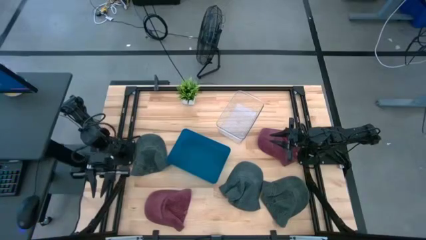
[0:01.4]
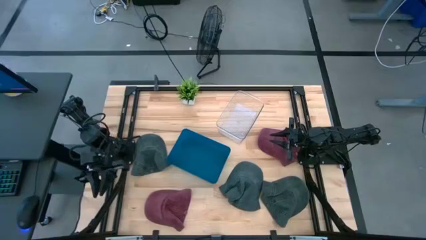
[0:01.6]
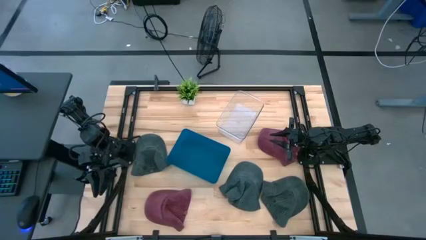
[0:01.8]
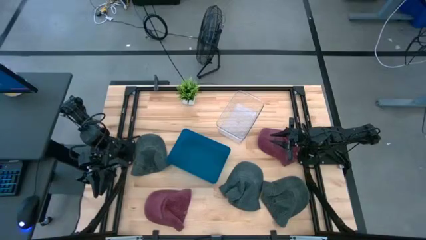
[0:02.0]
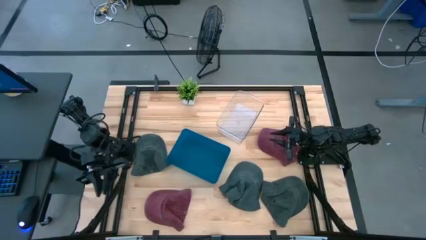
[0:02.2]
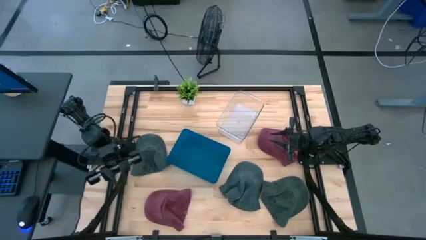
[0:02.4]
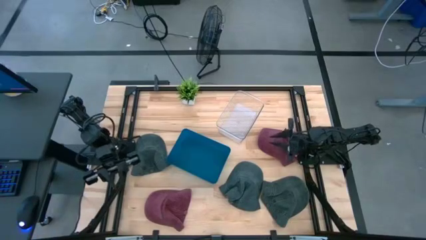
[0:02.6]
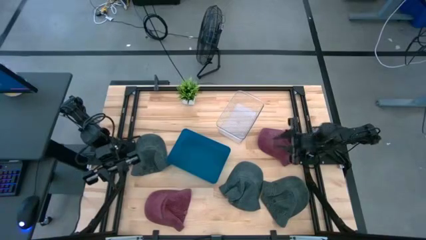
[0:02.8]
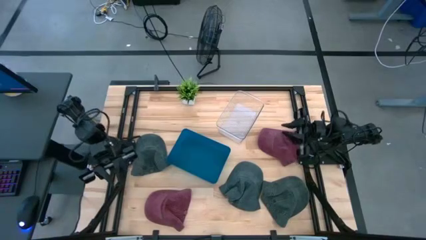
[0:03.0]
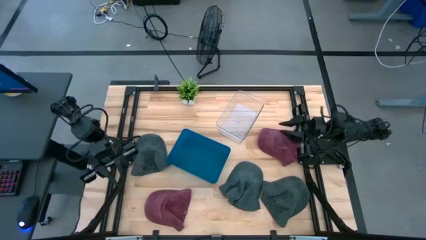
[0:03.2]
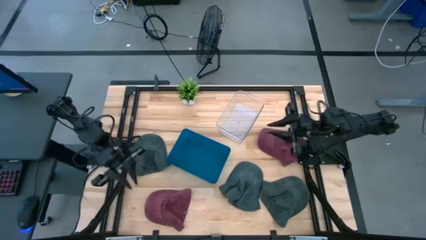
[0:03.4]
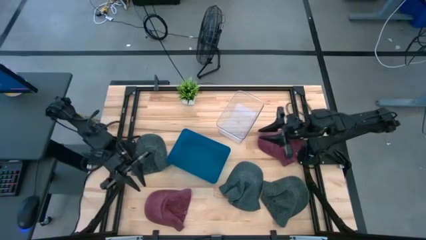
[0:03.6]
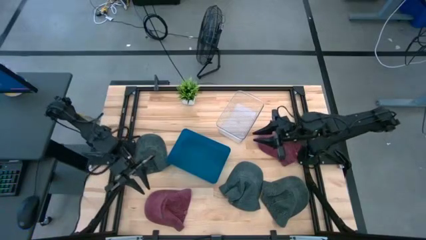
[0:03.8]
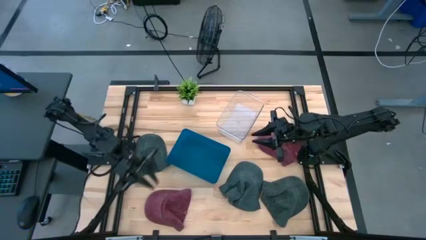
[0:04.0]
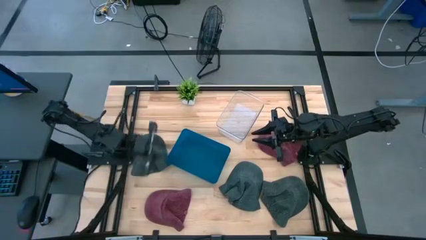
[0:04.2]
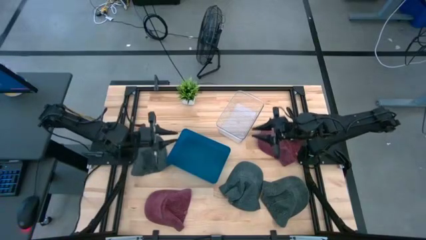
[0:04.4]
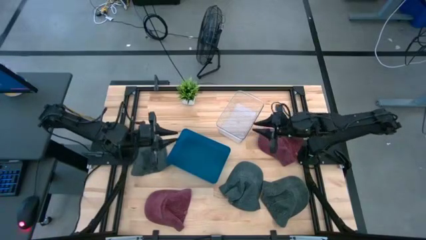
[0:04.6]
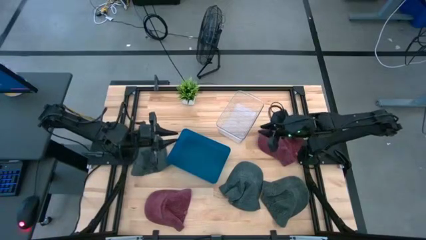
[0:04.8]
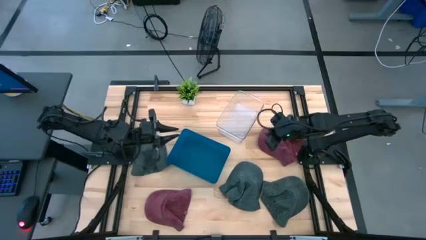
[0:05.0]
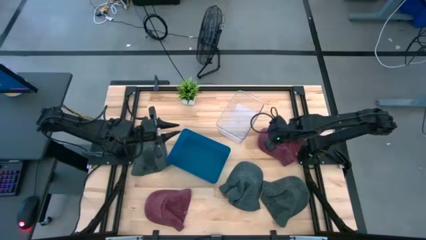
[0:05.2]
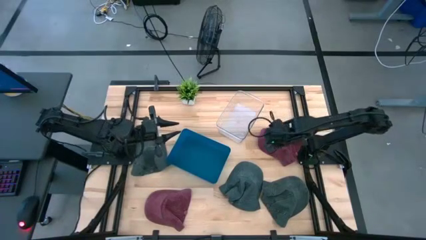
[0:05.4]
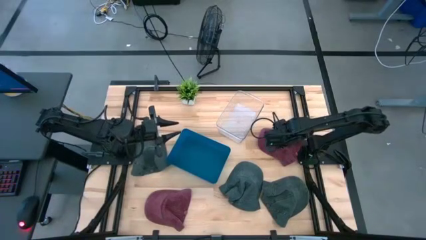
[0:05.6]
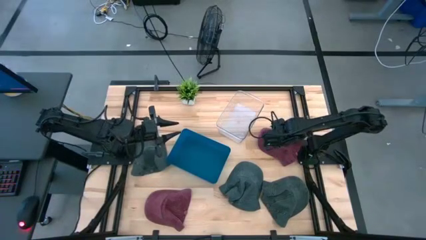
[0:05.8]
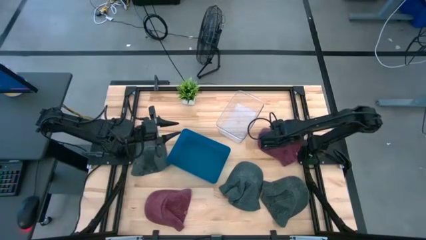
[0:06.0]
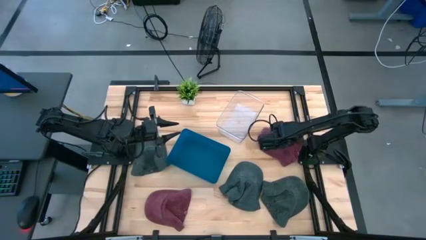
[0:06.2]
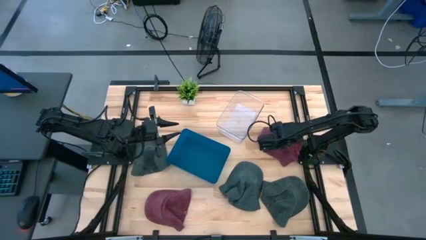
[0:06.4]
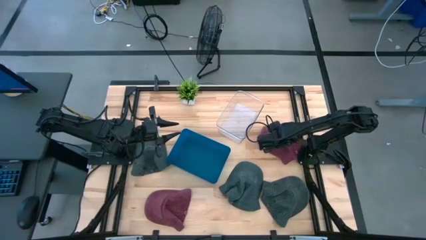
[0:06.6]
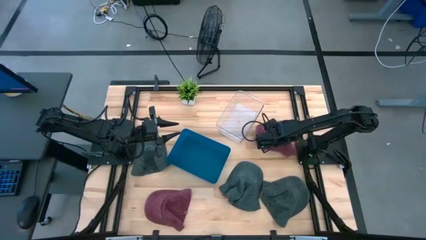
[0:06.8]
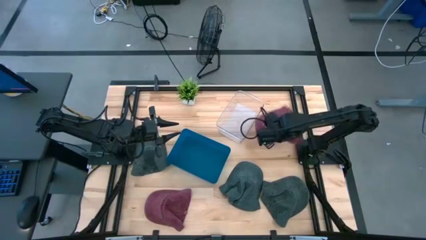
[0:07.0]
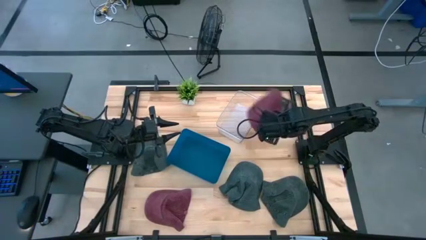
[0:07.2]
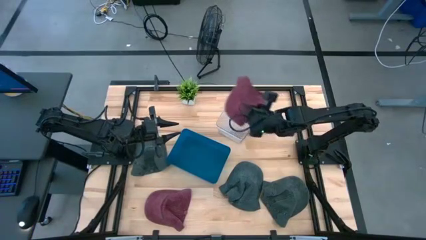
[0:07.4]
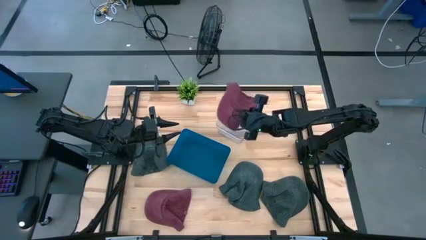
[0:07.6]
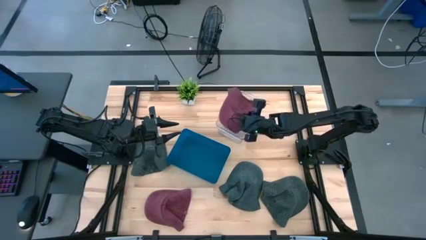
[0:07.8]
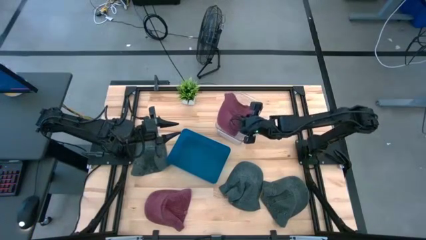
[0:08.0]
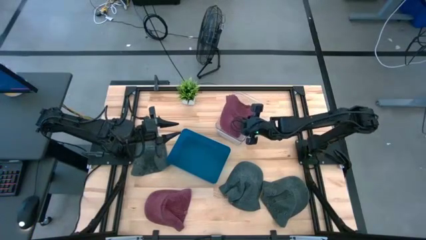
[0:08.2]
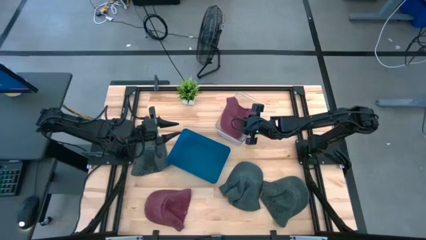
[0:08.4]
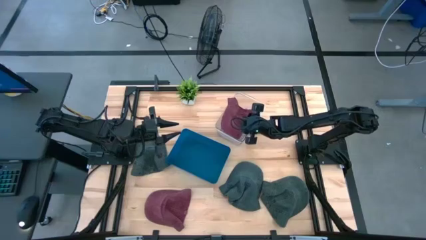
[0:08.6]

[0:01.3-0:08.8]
Task: Pick & Place hat
Put the right dark red cap into the transparent bin

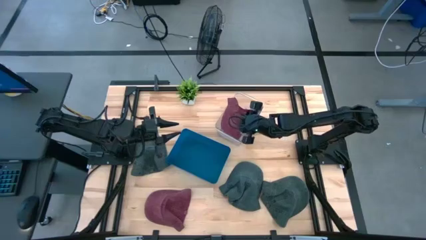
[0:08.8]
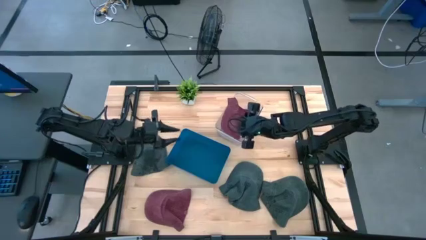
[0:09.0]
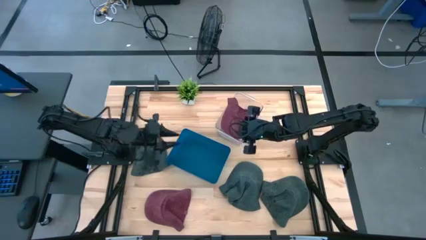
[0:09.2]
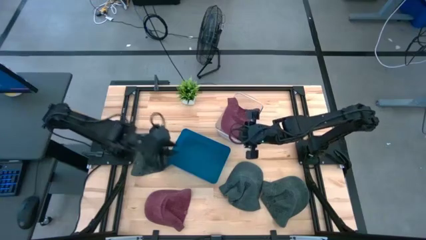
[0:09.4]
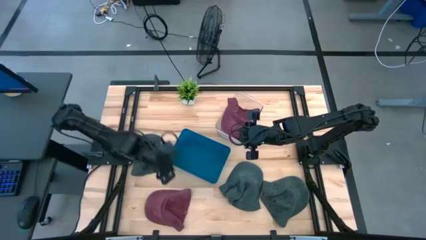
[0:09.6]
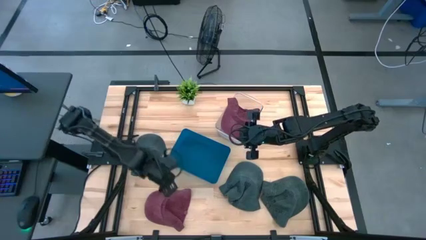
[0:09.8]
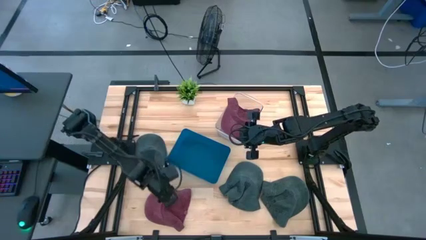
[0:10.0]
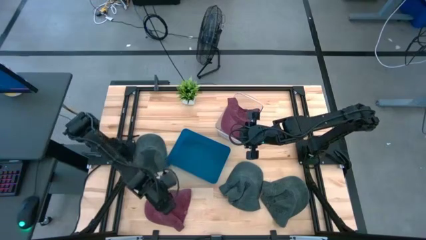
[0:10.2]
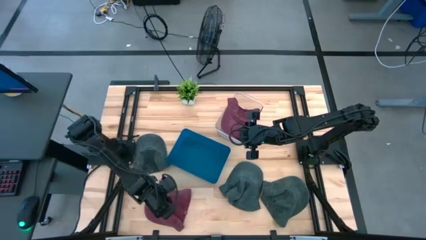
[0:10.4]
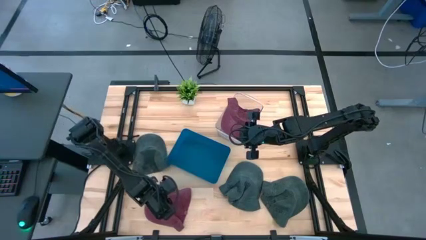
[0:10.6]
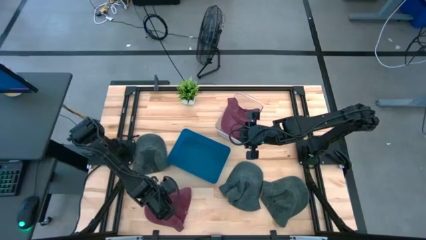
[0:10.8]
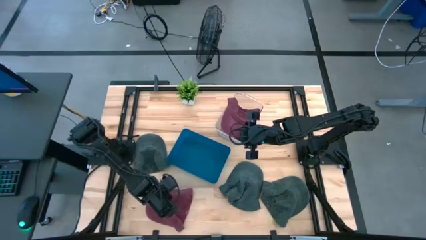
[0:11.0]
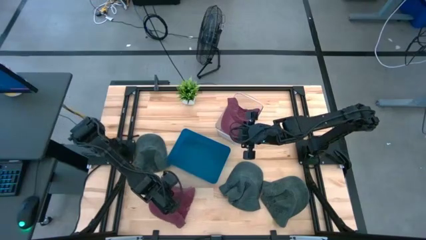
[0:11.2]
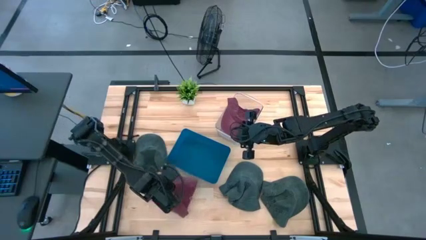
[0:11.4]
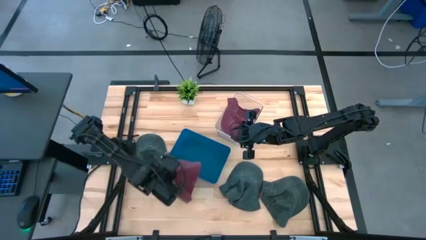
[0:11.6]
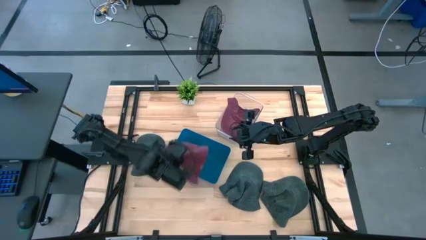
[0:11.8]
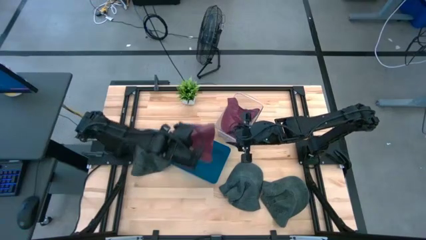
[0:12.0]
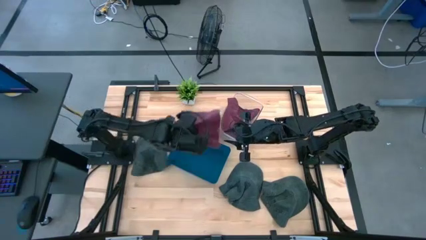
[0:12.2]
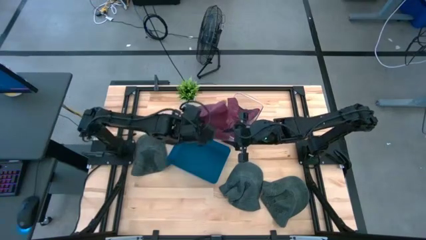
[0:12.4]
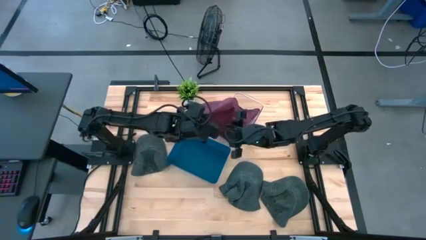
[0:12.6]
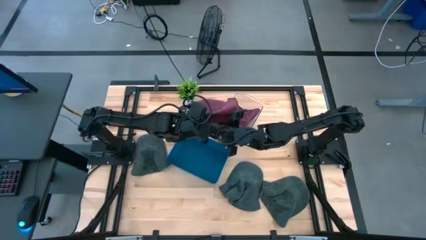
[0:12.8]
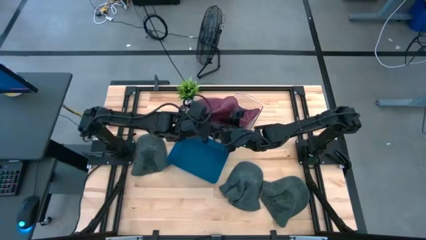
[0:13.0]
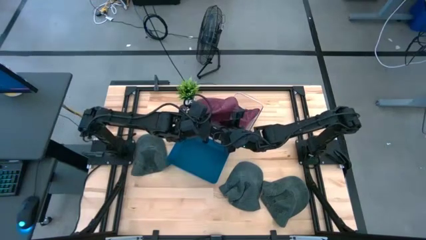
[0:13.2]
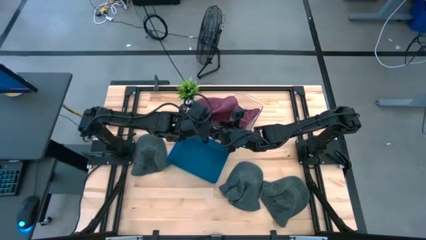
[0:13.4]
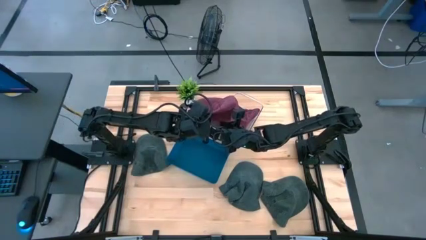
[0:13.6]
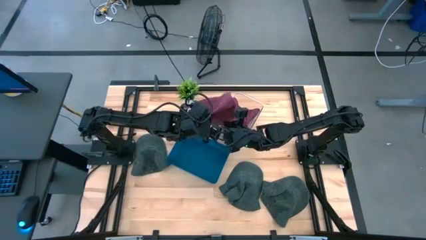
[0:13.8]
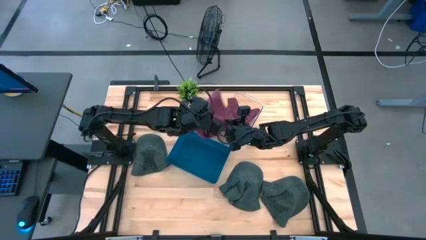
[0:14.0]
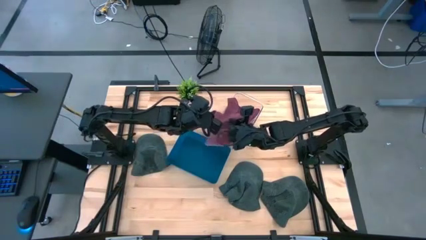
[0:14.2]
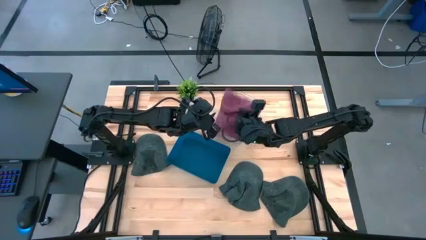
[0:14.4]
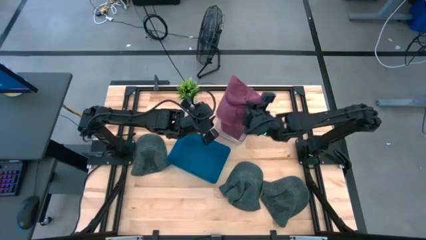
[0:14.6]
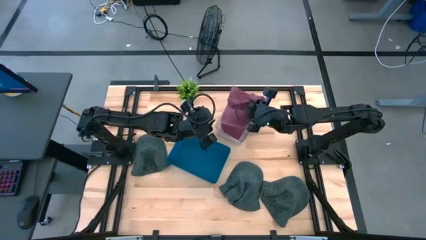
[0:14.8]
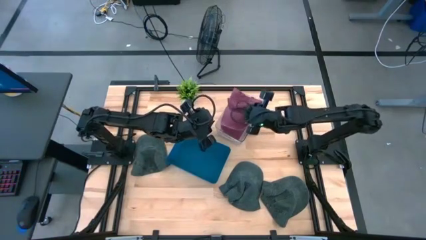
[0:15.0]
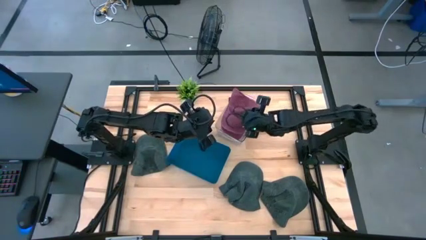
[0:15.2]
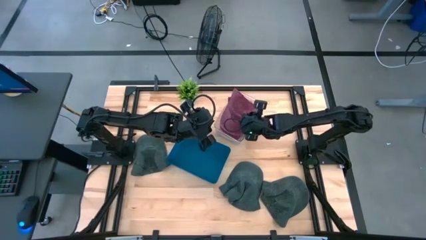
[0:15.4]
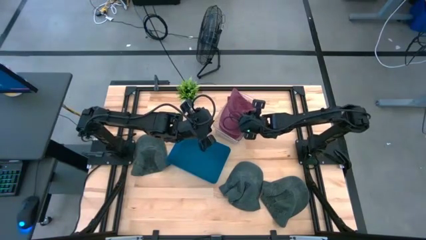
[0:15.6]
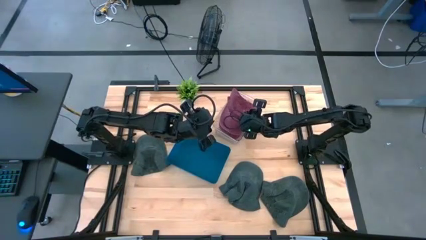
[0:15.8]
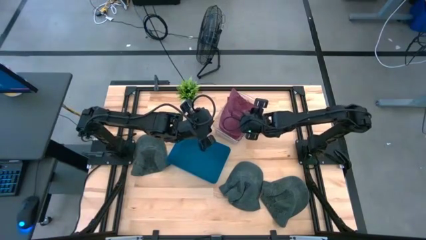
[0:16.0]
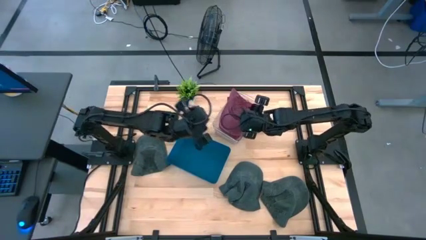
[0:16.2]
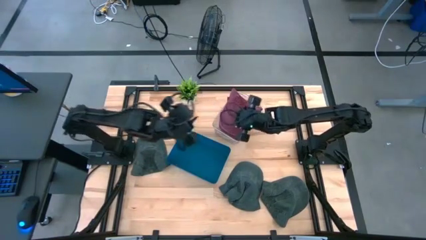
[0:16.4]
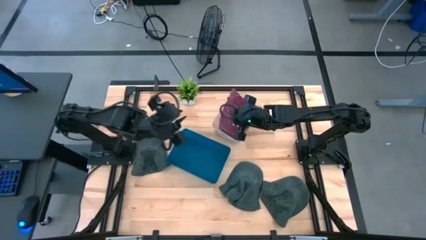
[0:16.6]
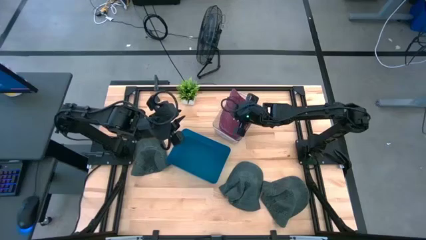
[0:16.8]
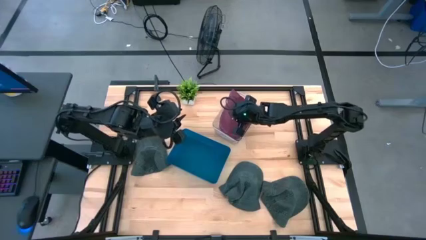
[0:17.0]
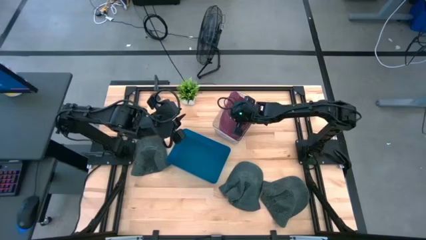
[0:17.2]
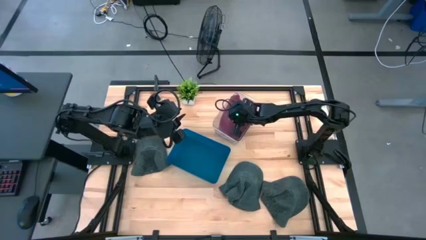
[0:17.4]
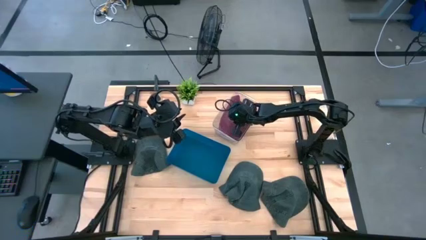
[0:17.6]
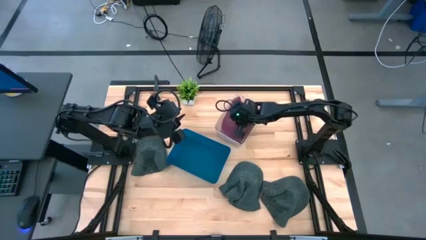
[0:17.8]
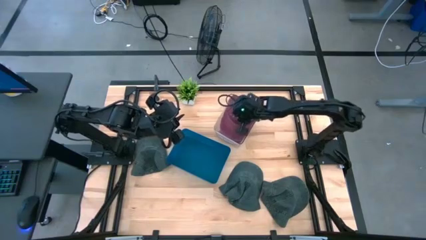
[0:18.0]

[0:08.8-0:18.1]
Put the dark red cap into the transparent bin
